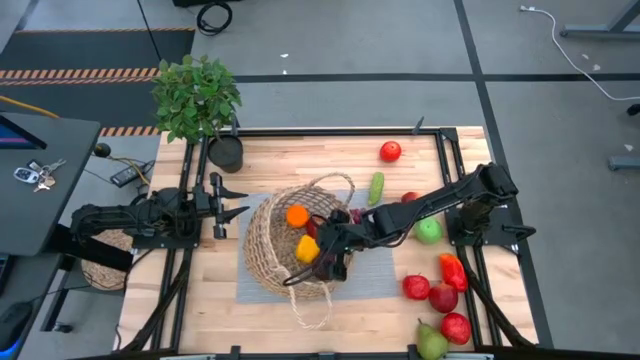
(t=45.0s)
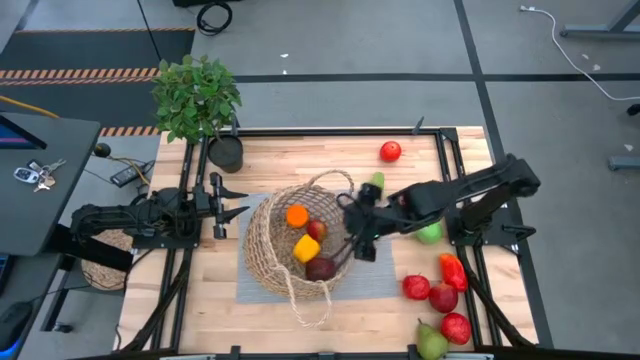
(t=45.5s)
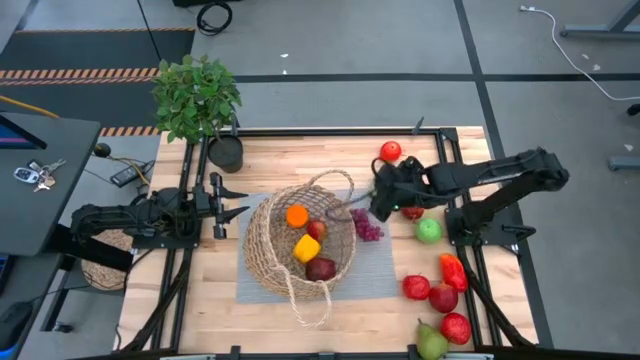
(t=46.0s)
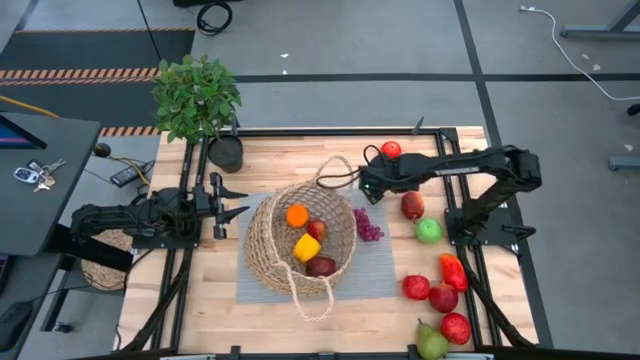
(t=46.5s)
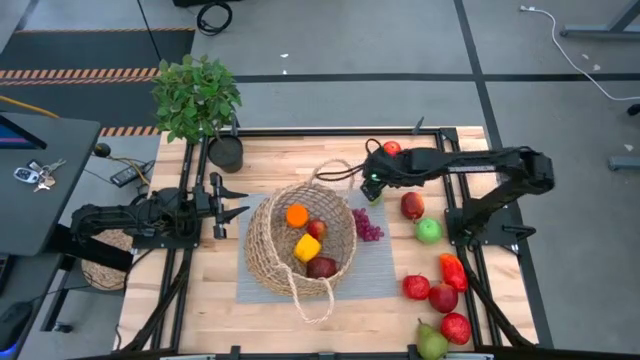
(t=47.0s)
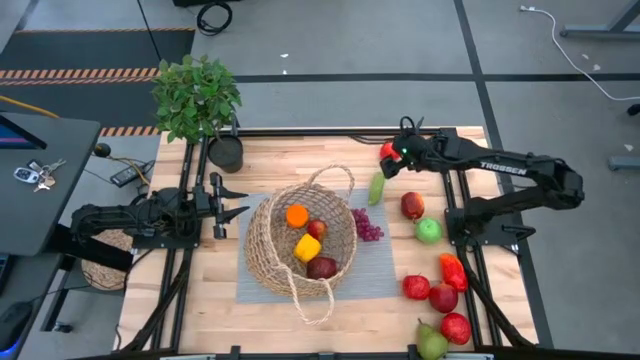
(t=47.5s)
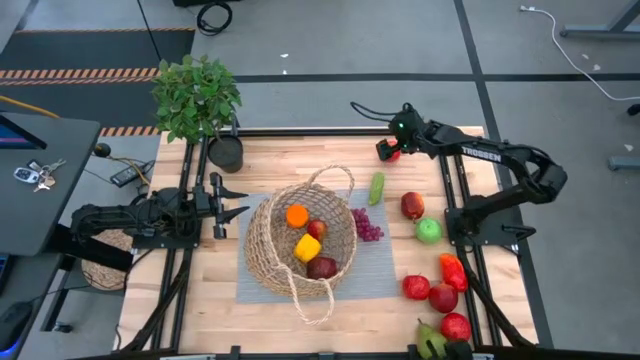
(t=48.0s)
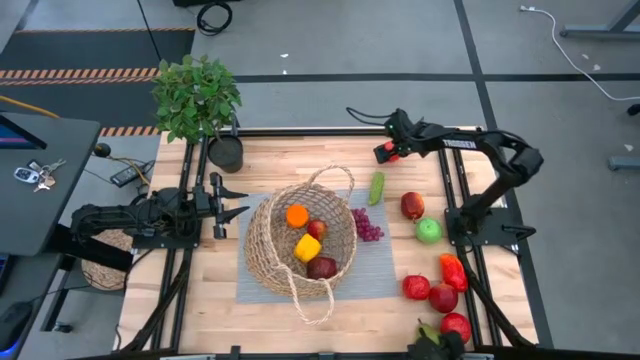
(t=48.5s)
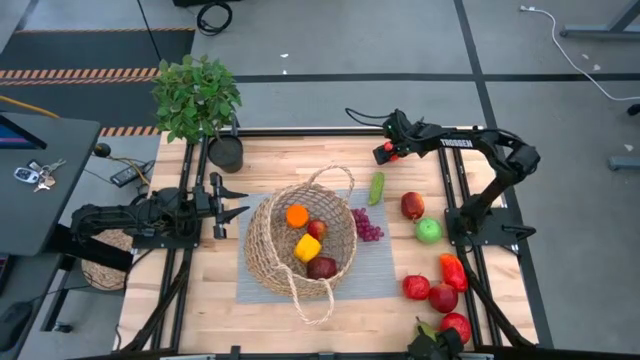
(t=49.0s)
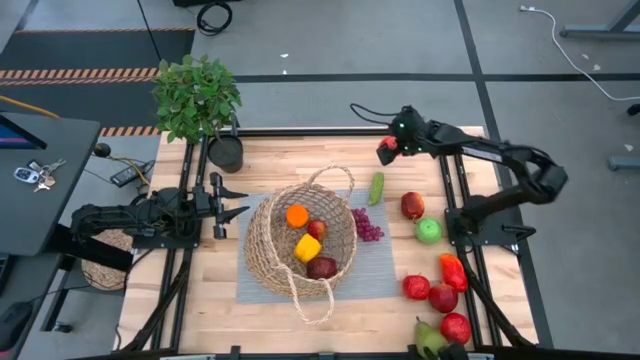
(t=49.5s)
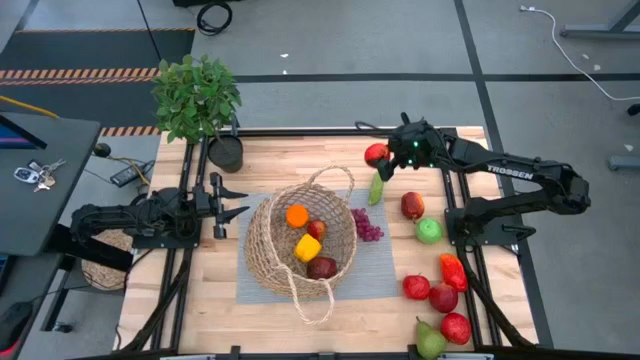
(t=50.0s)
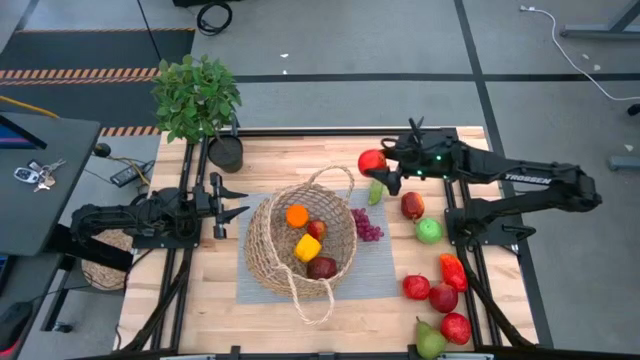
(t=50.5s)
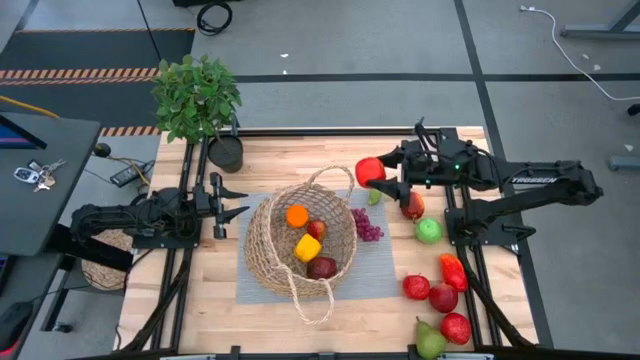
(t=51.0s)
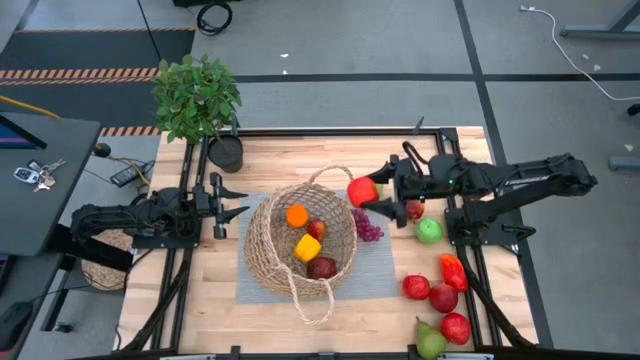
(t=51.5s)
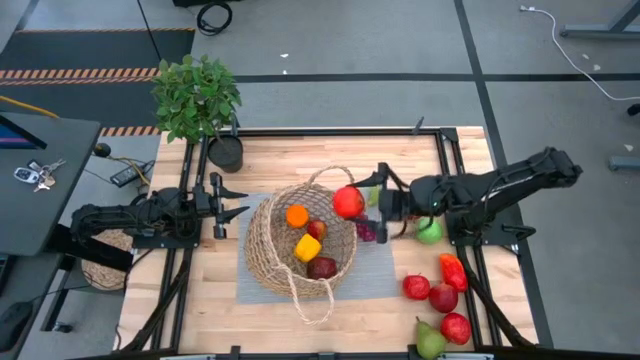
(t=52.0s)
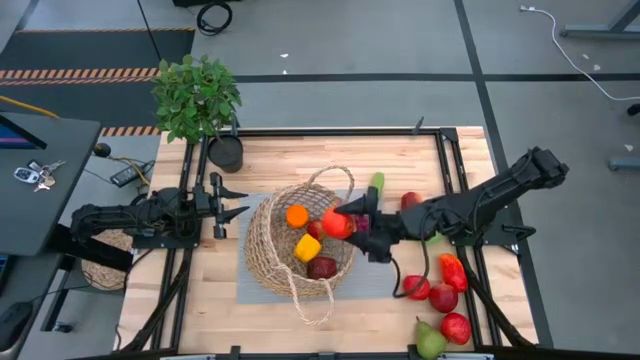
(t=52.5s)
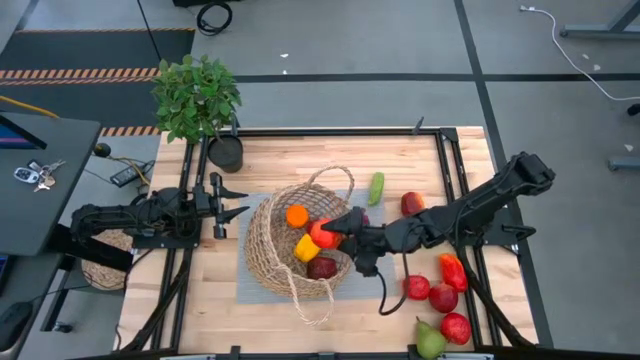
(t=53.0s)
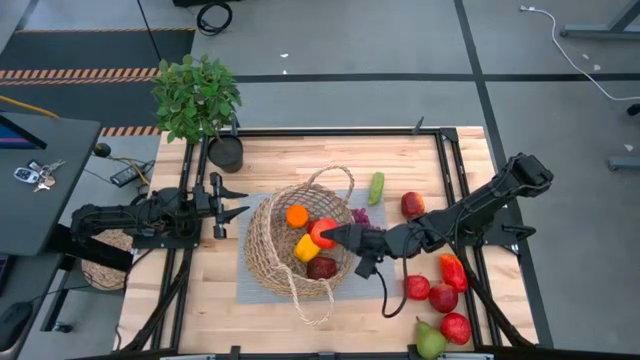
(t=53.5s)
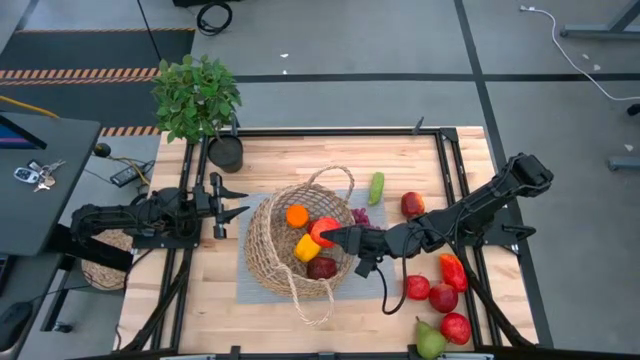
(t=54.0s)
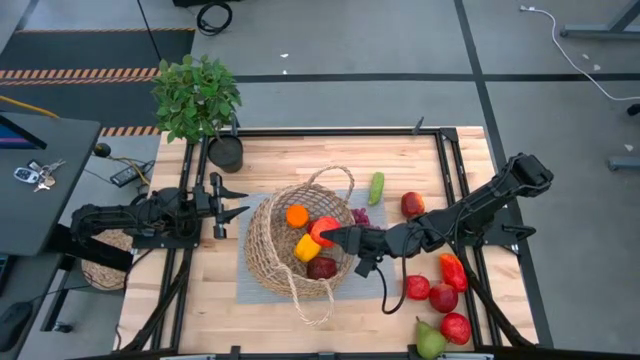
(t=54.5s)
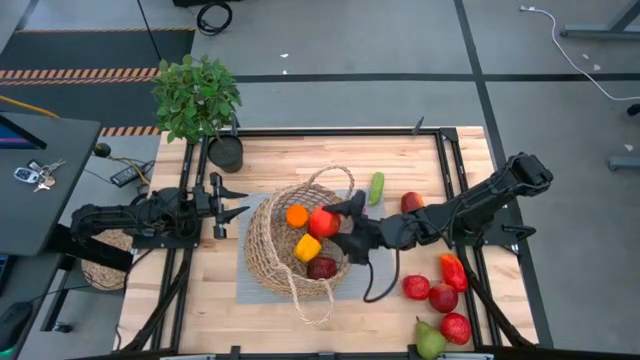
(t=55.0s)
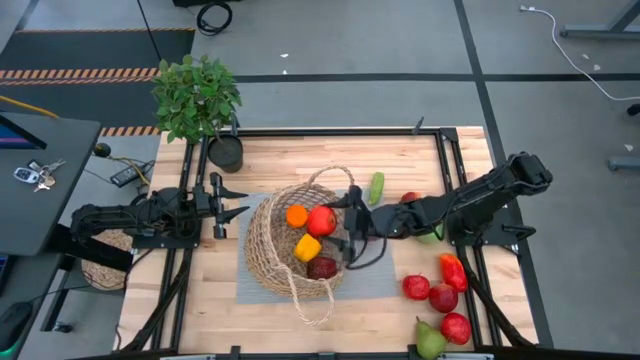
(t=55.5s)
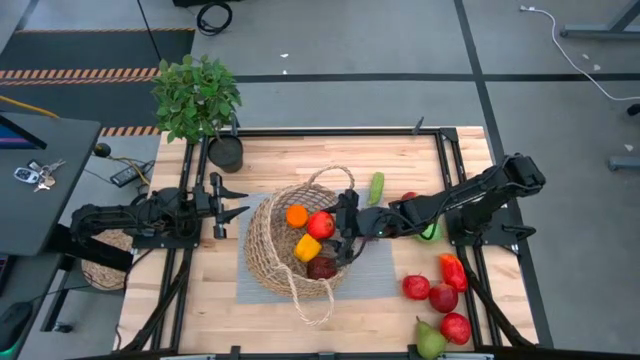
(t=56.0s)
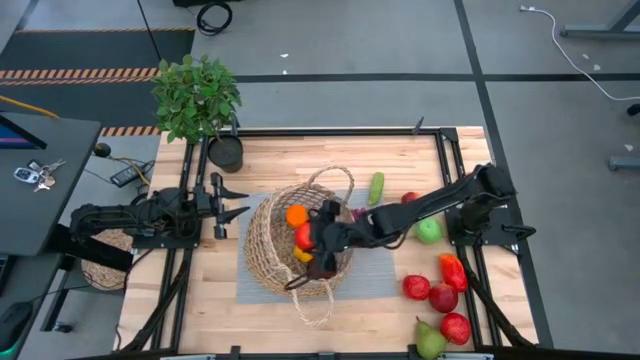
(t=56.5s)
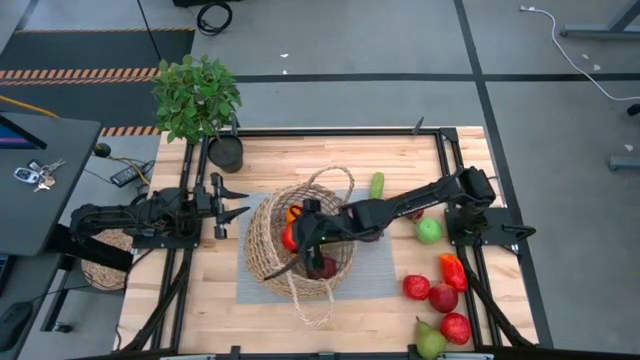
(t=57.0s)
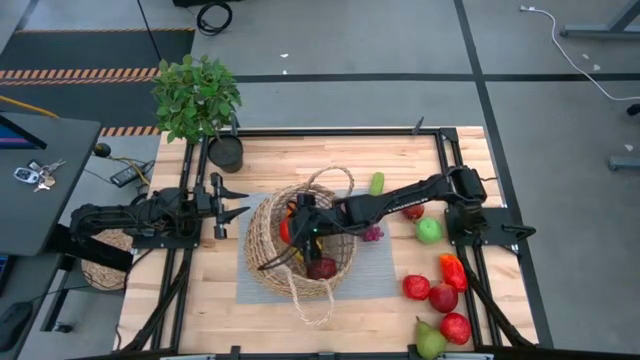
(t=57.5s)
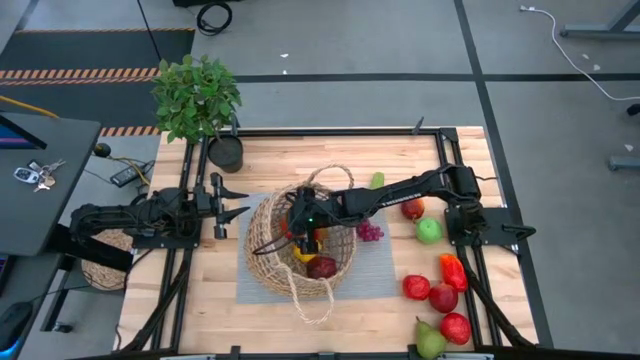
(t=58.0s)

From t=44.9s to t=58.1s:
Task: Build produce basket
Put the red apple in the basket

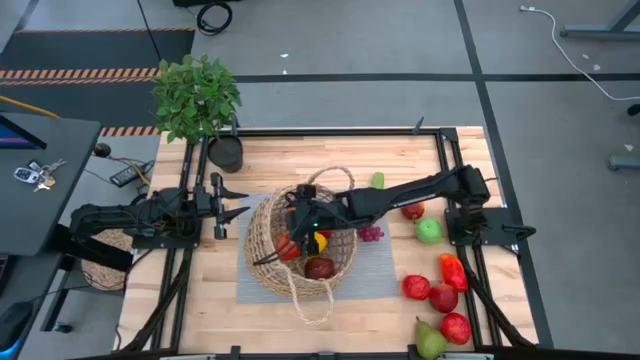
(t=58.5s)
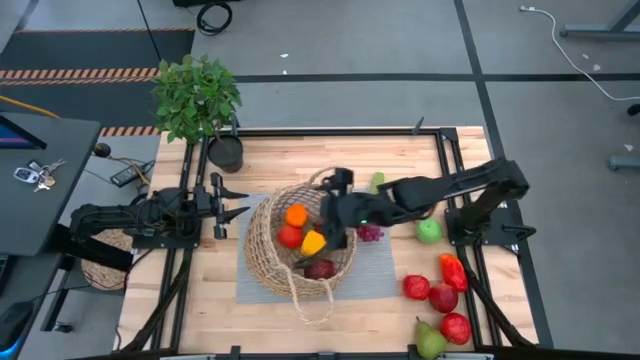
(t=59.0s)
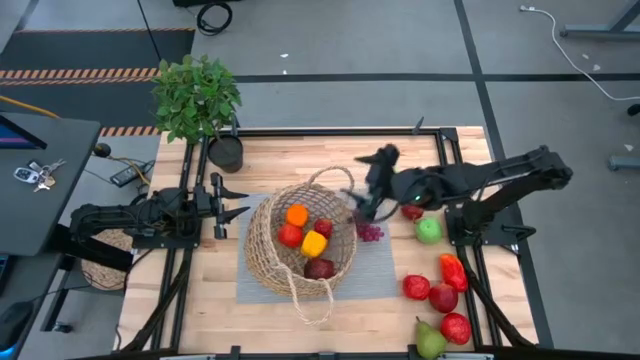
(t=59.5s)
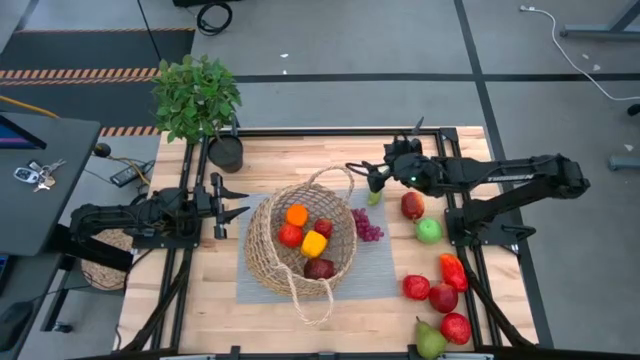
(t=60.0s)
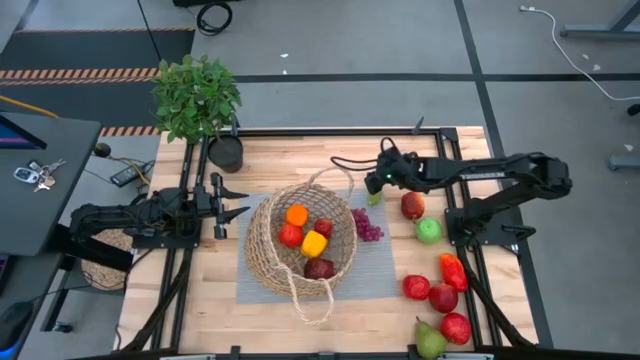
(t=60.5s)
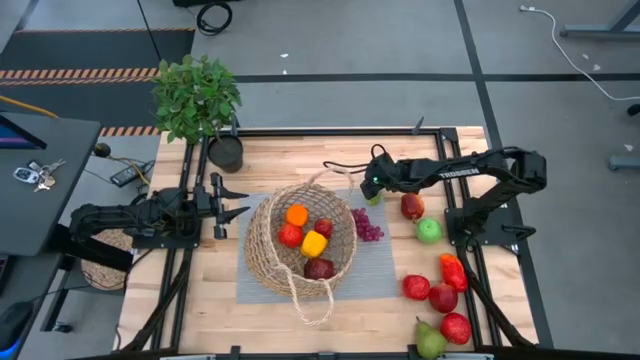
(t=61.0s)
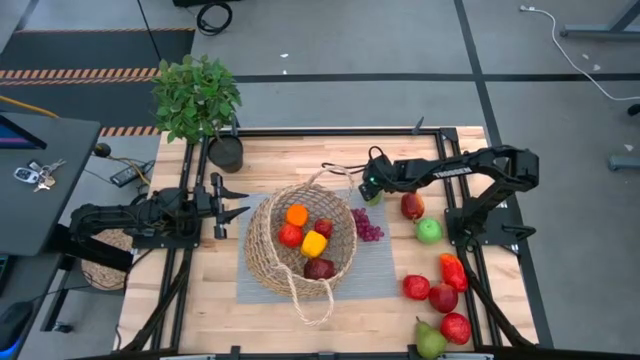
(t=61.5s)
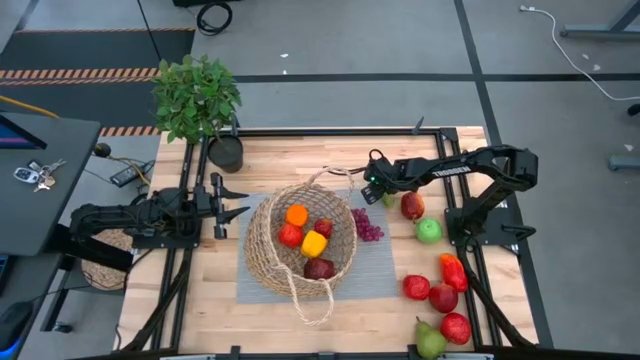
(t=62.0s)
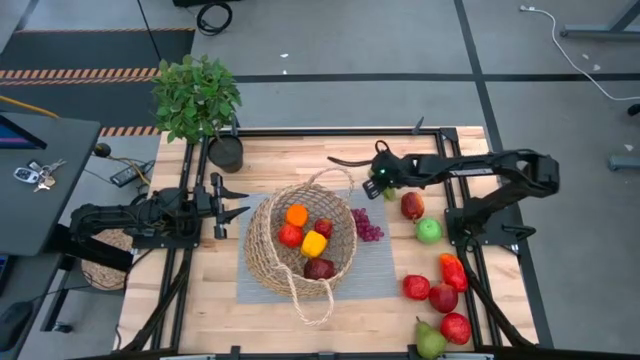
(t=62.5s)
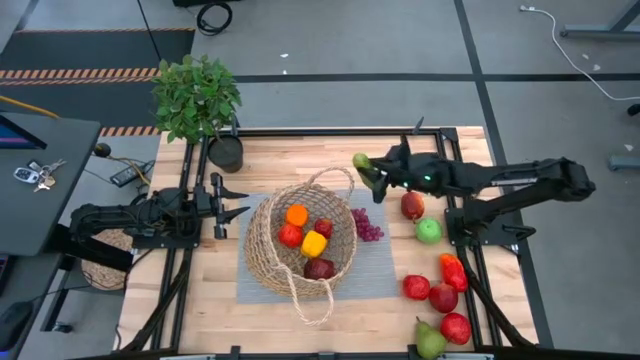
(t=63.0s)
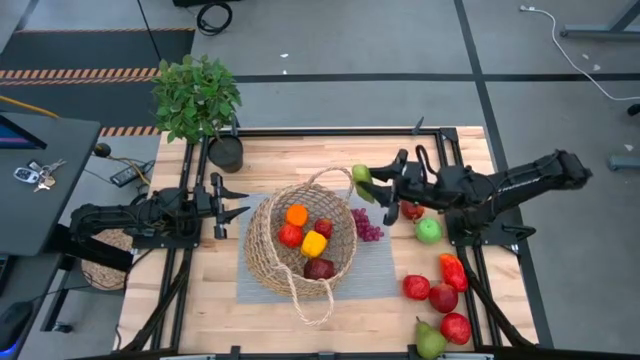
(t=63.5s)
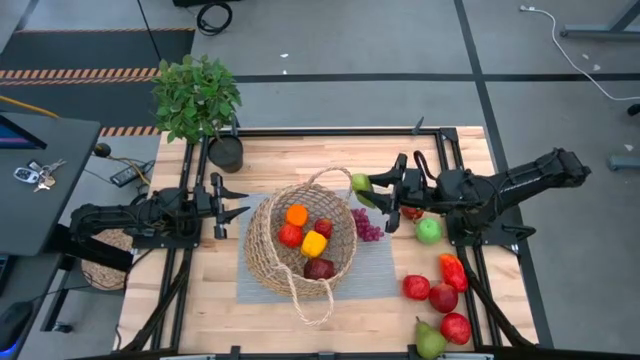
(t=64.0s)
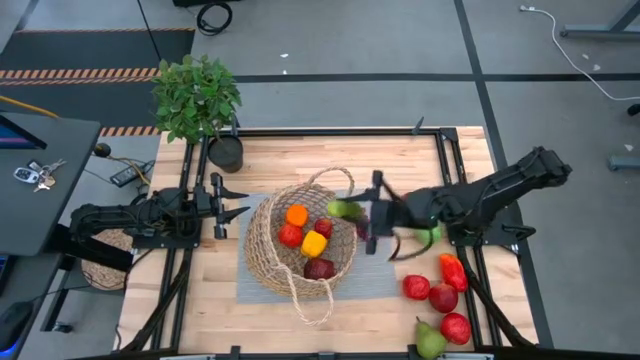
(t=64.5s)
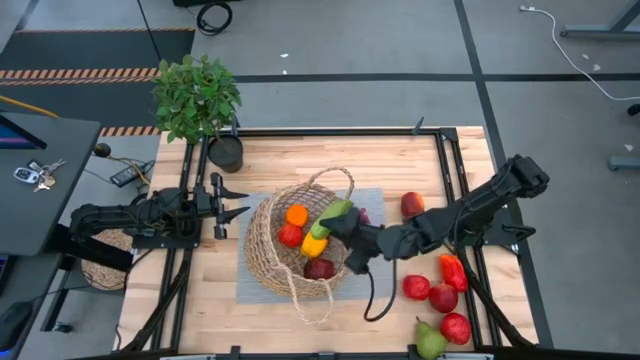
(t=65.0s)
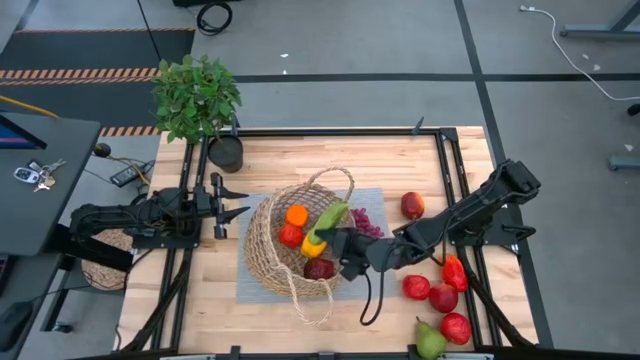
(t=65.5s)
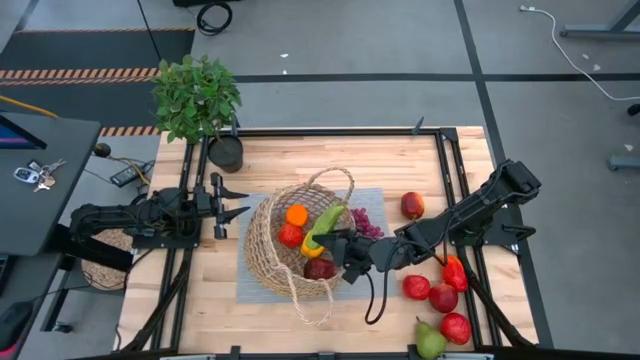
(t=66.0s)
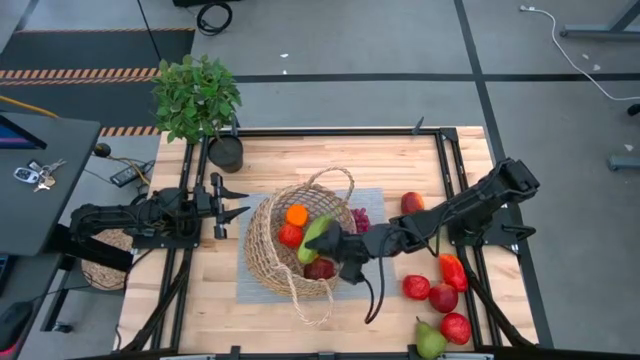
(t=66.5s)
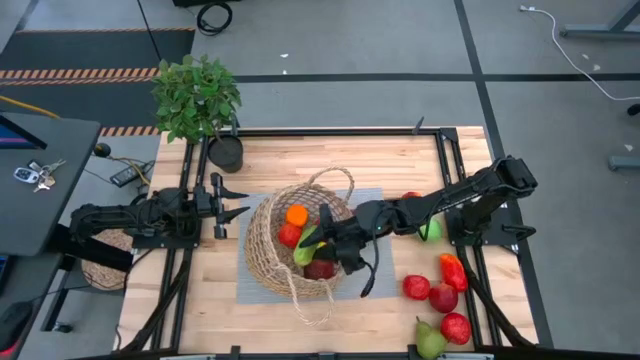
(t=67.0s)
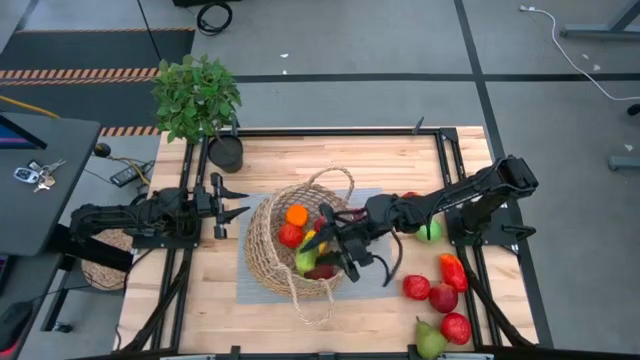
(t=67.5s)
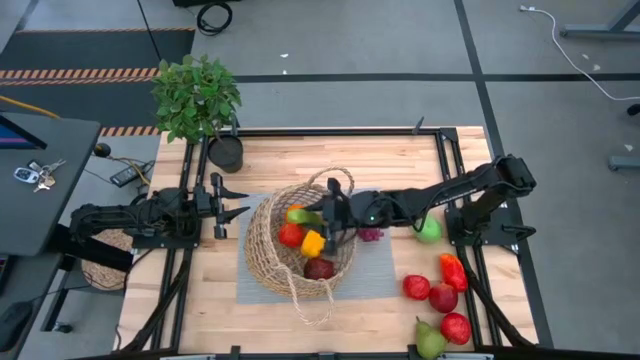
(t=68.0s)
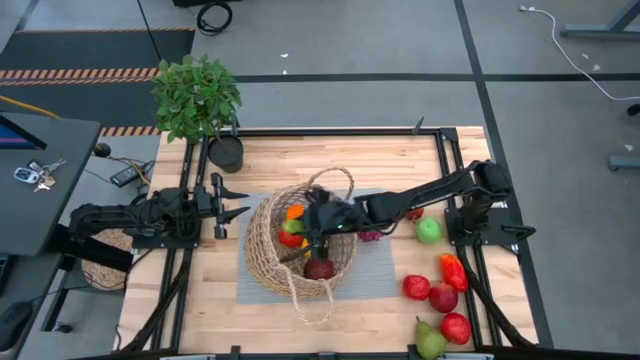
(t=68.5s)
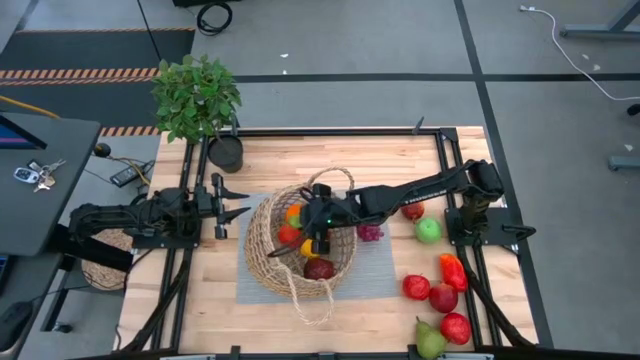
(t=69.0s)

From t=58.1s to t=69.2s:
Put the cucumber in the basket
